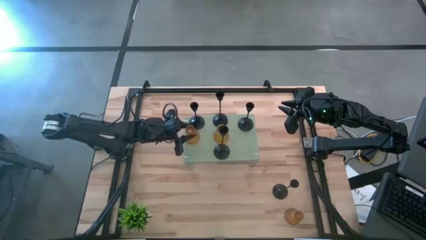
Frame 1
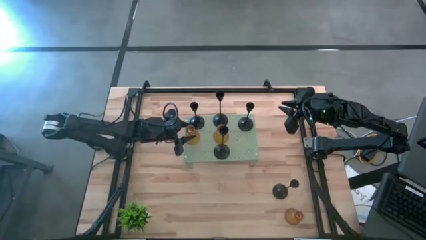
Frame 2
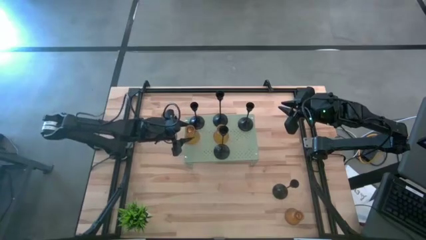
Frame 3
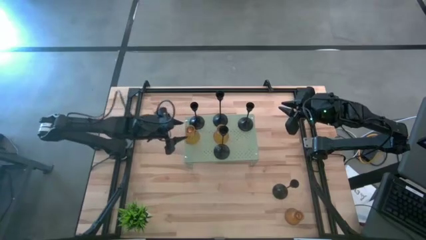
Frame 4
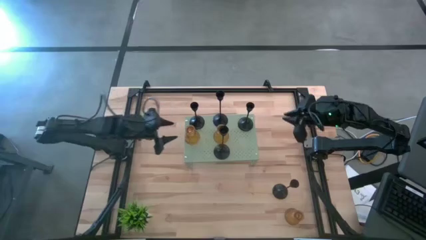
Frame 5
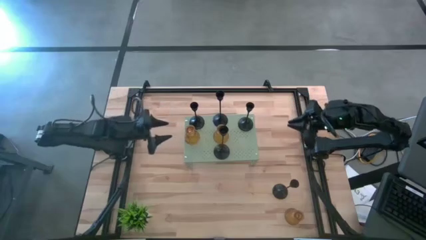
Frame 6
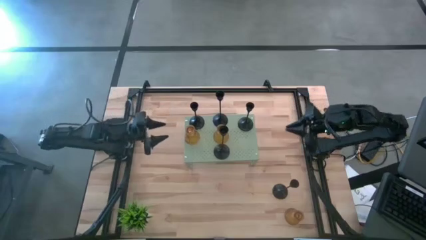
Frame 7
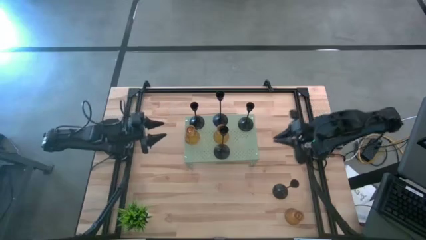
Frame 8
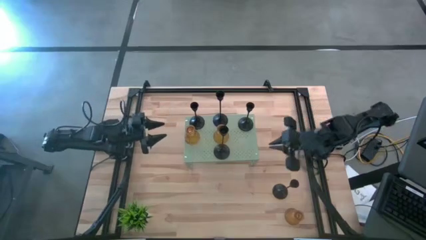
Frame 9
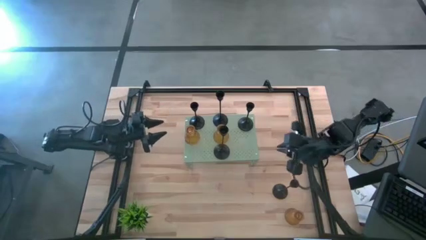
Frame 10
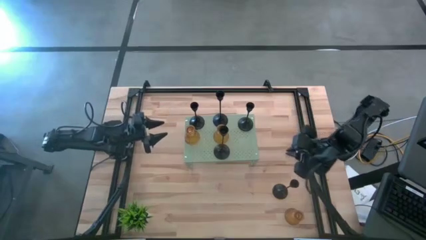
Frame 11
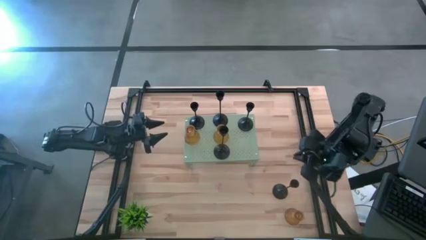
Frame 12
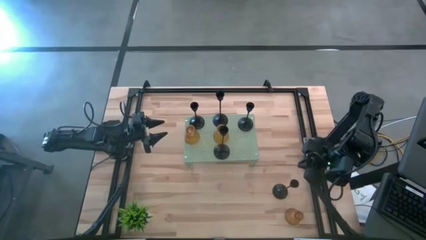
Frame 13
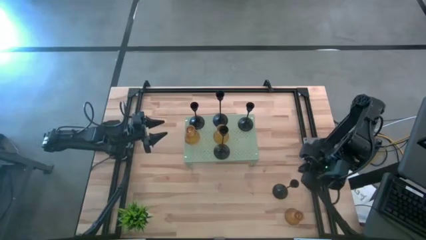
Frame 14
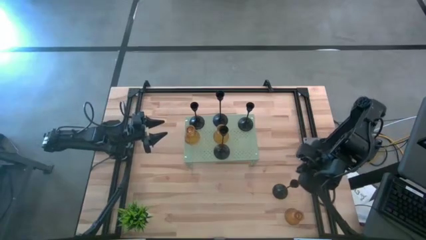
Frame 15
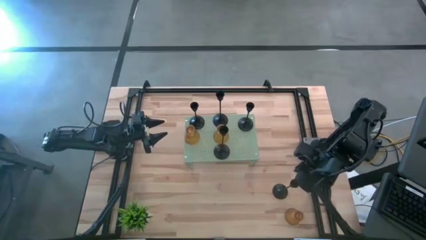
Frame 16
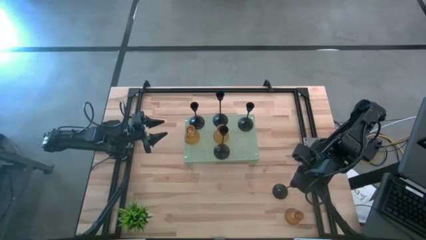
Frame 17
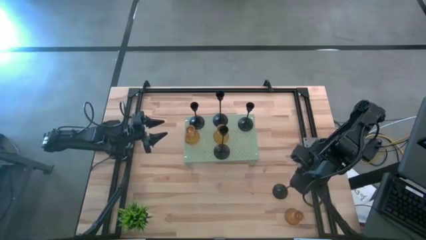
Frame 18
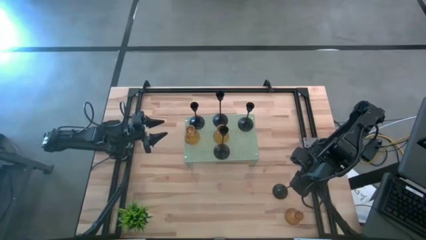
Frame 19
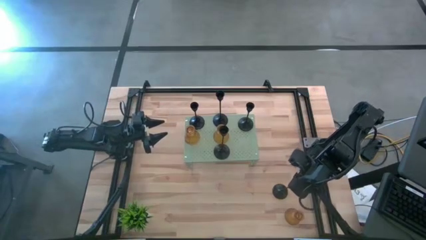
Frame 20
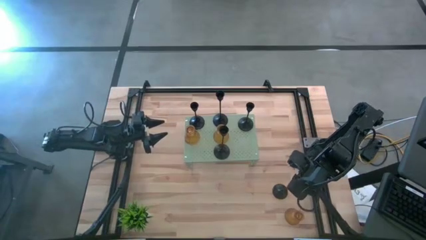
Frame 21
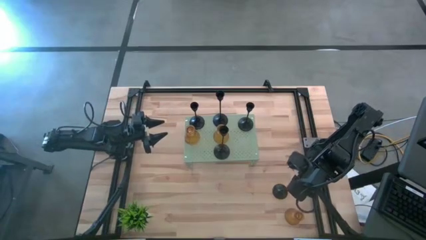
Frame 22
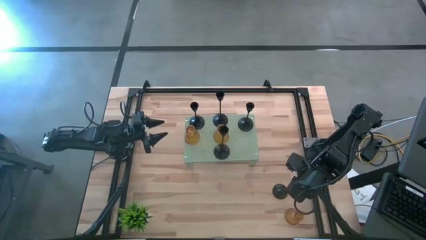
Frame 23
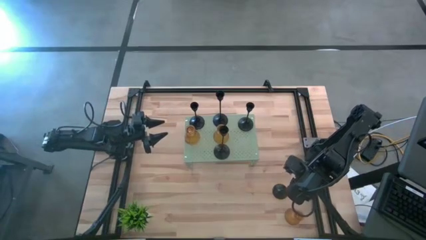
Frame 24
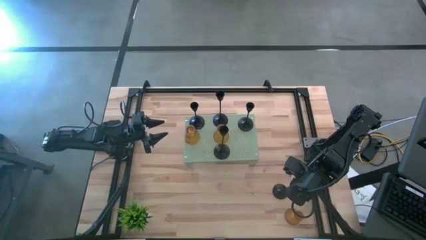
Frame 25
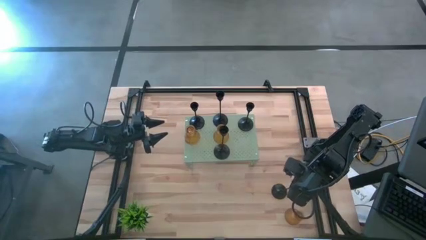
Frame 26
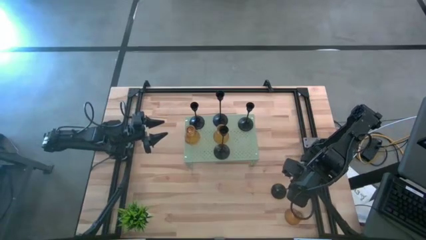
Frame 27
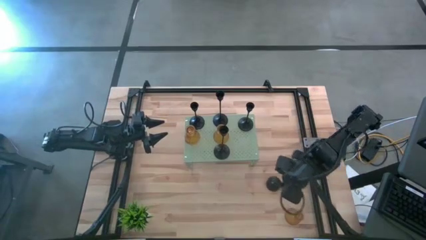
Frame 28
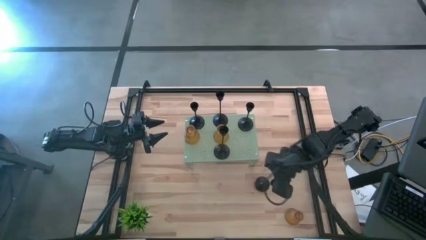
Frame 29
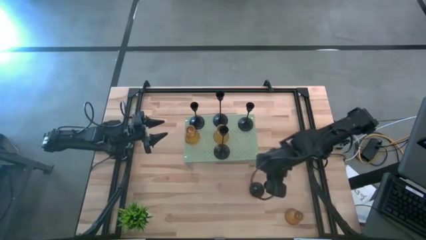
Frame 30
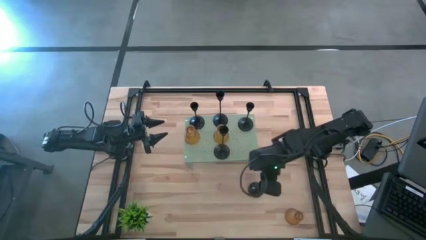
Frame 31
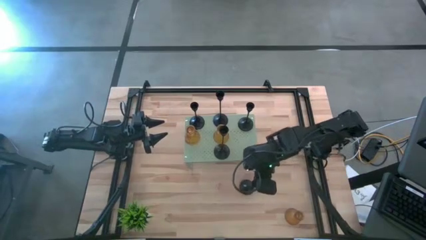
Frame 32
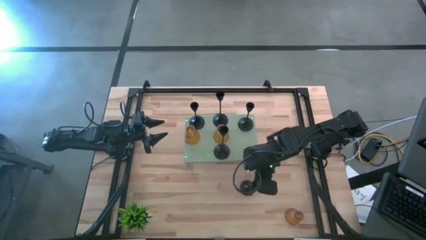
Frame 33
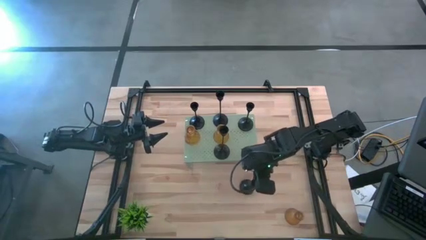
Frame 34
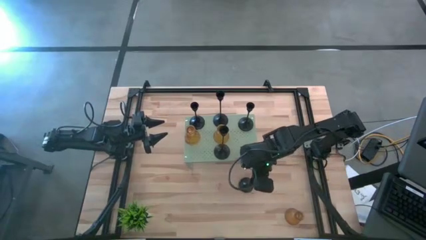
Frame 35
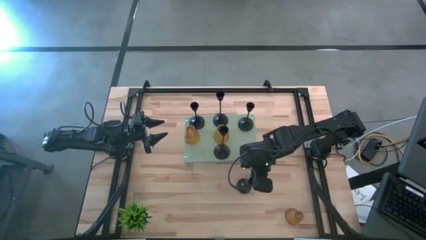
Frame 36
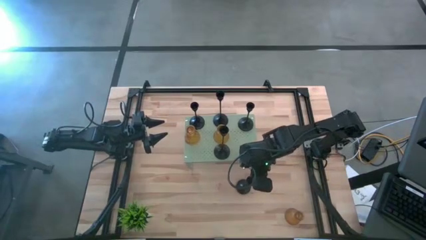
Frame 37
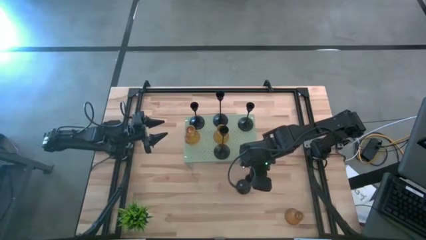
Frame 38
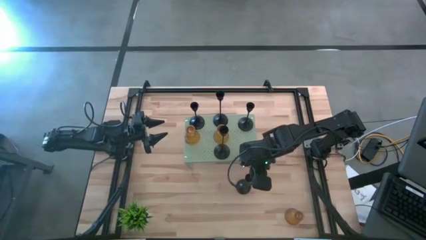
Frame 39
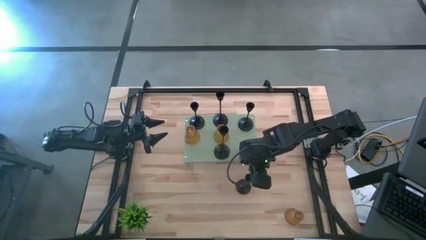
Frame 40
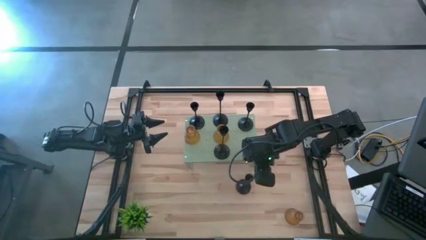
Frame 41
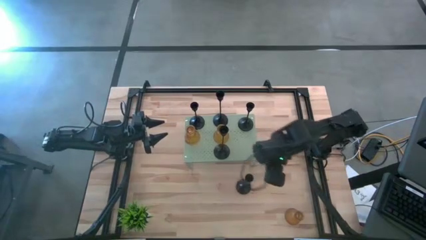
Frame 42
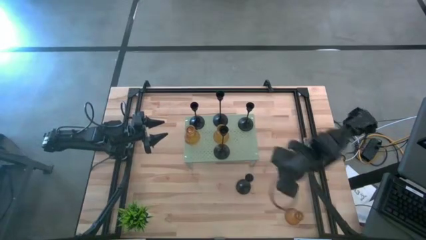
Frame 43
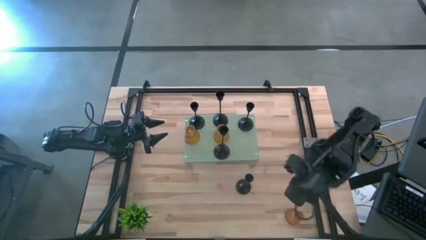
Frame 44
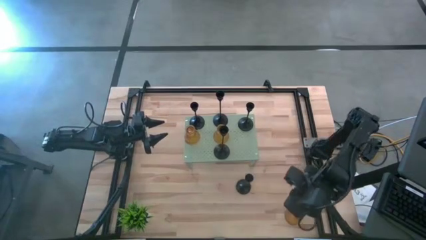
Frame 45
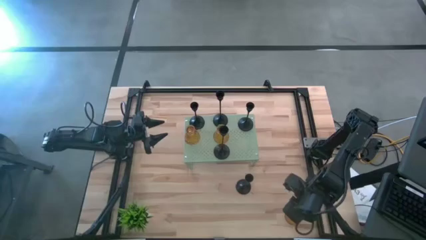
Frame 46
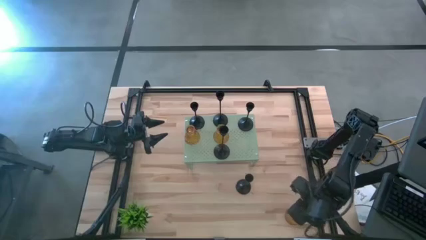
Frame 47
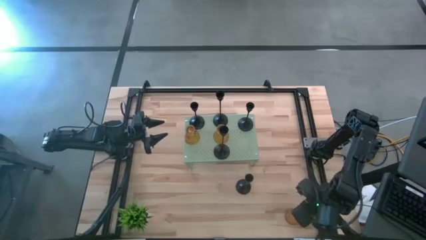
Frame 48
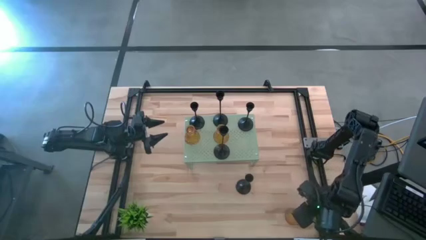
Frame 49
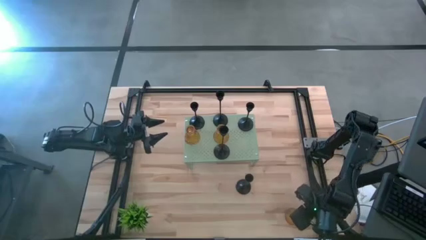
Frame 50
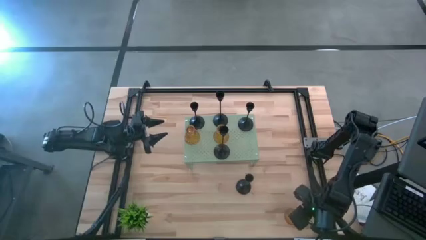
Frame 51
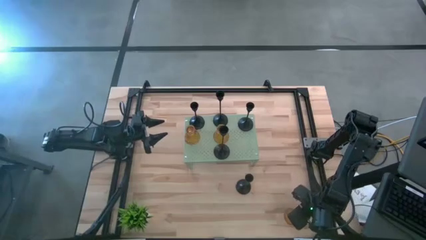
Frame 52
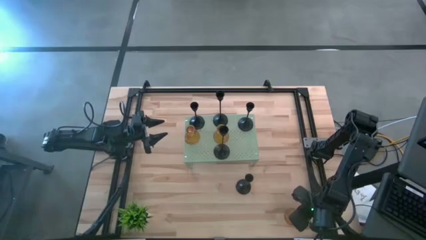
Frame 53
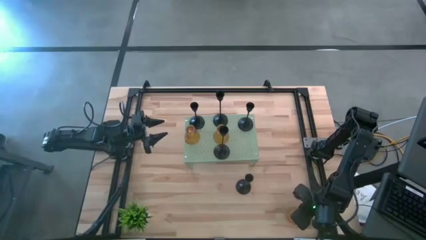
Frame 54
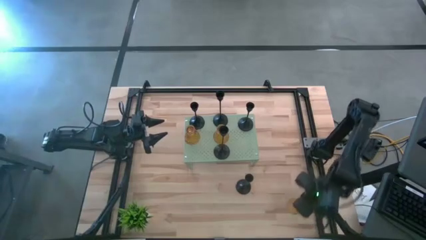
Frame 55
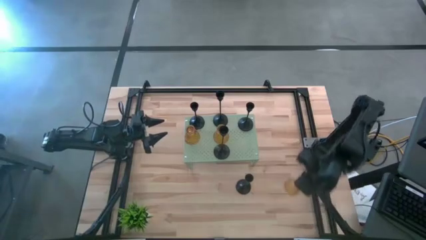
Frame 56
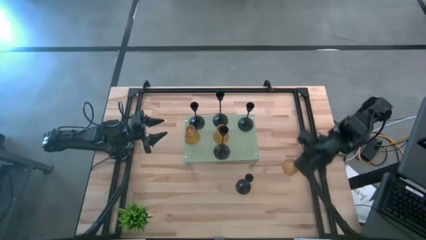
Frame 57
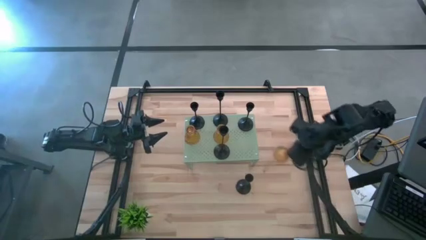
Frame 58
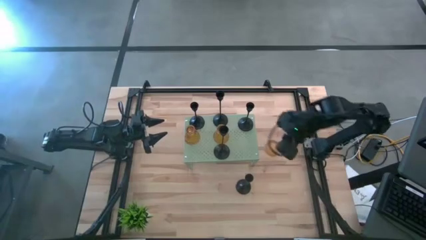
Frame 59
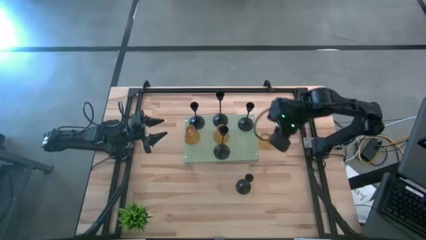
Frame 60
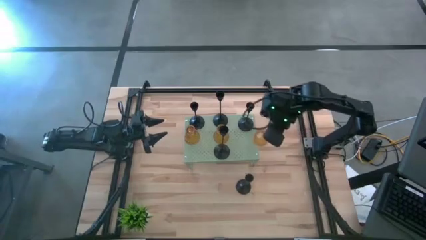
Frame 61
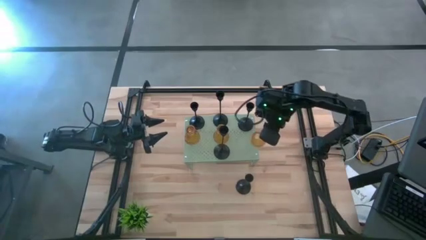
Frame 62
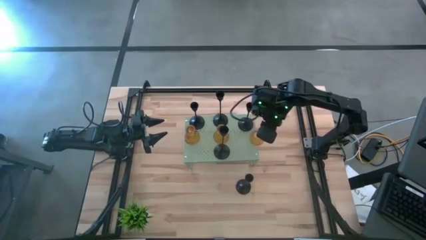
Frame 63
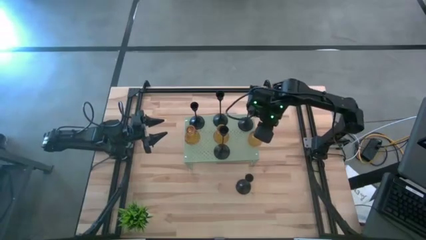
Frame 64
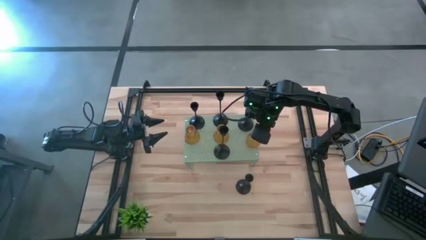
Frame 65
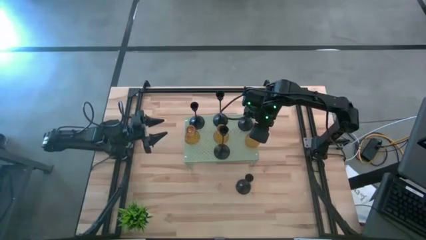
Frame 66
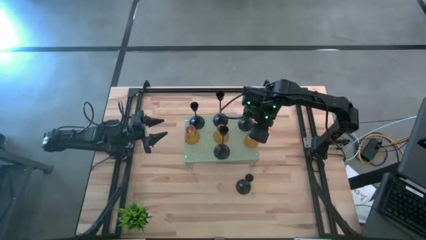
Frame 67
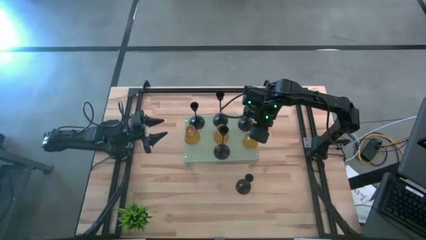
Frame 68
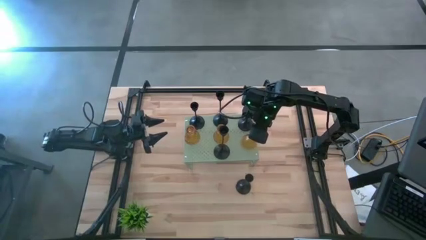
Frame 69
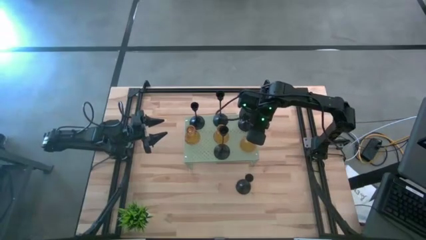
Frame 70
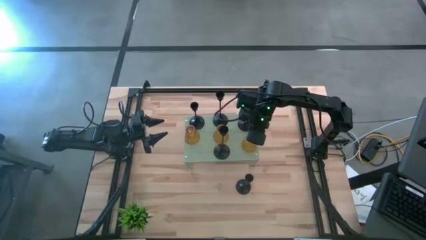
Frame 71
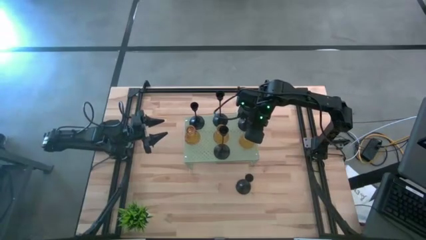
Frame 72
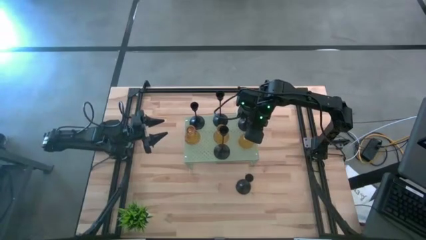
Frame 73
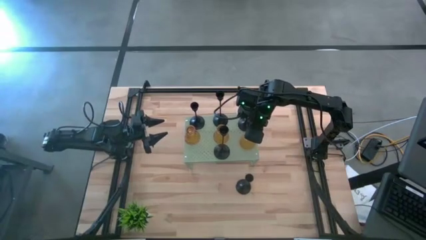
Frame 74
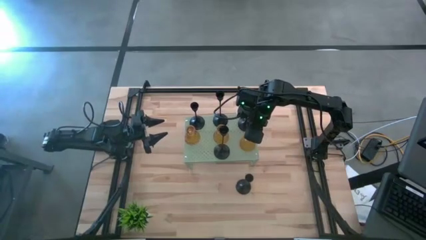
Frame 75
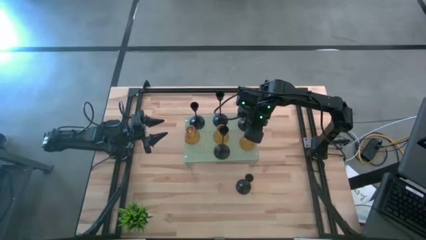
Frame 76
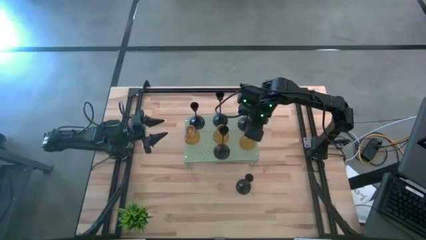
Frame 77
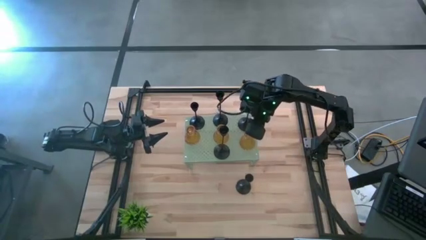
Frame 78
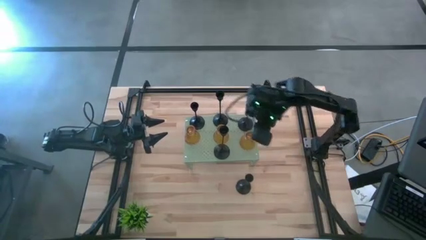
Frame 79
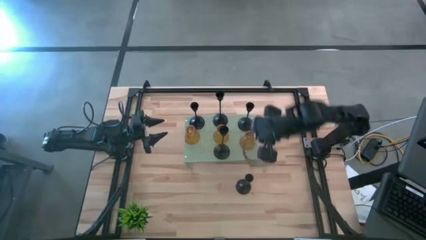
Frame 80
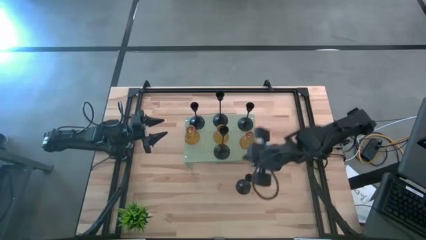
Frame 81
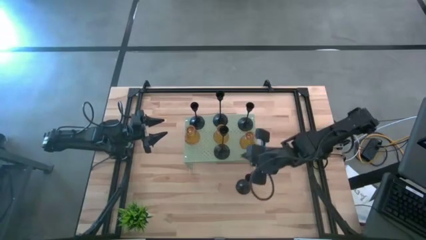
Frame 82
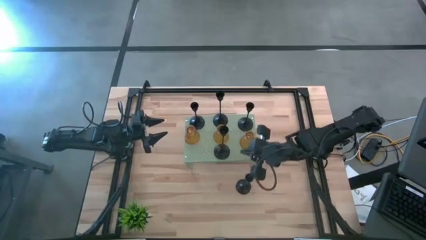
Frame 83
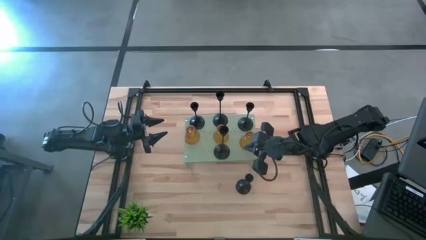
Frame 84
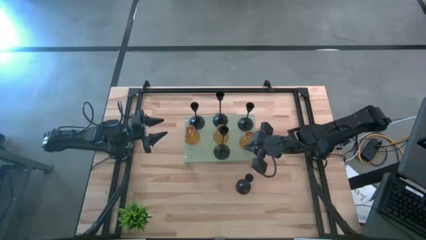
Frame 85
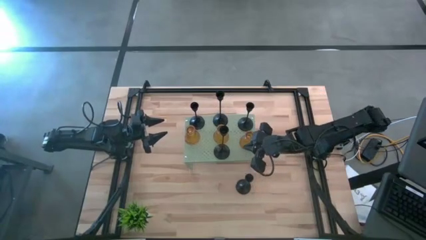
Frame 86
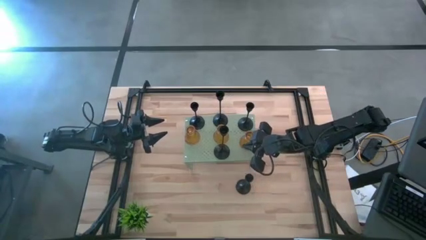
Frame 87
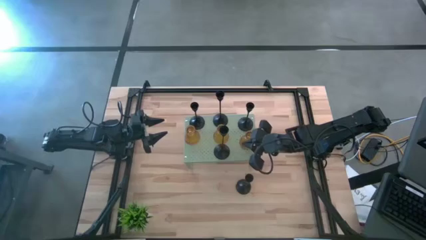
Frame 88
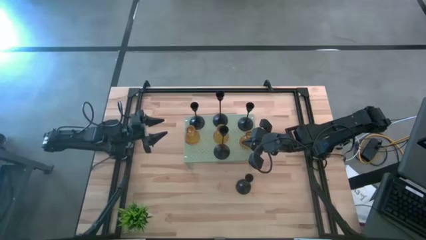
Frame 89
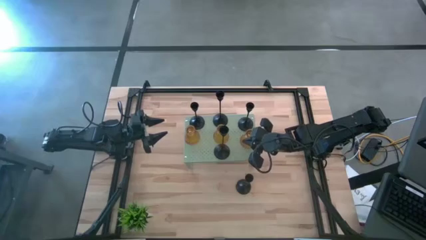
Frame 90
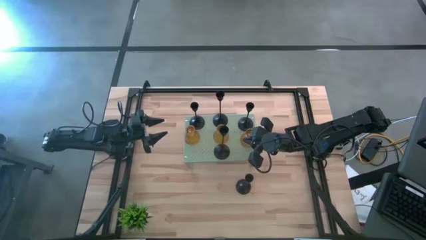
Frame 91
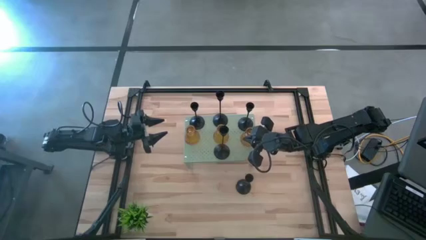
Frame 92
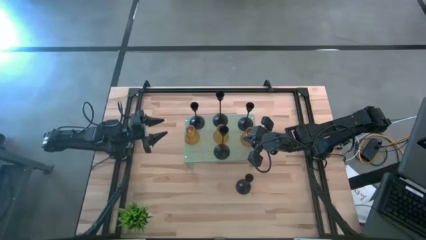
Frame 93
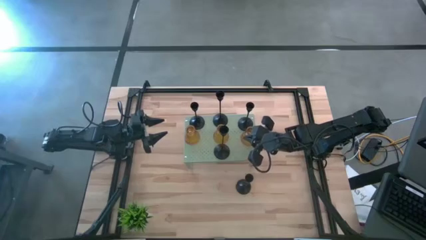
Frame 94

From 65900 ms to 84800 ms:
Task: Pick & Place candle stick holders
Align the yellow glass candle holder with the black candle holder on the shelf
